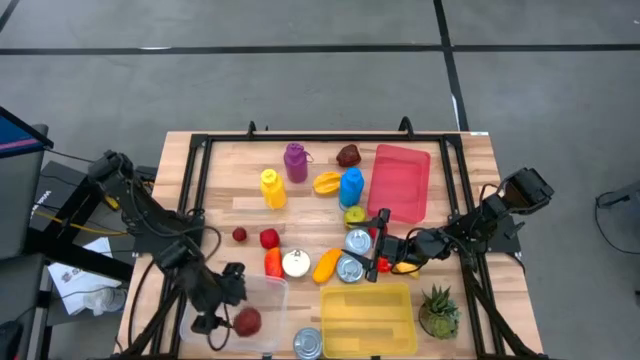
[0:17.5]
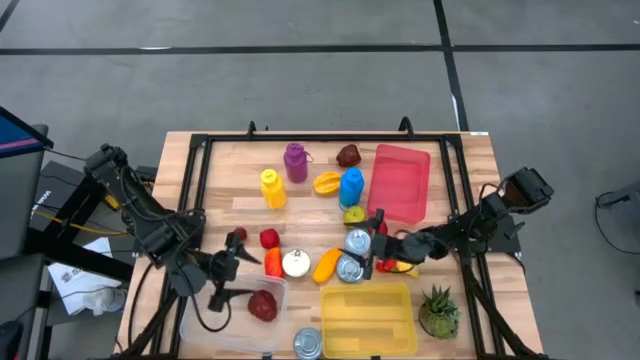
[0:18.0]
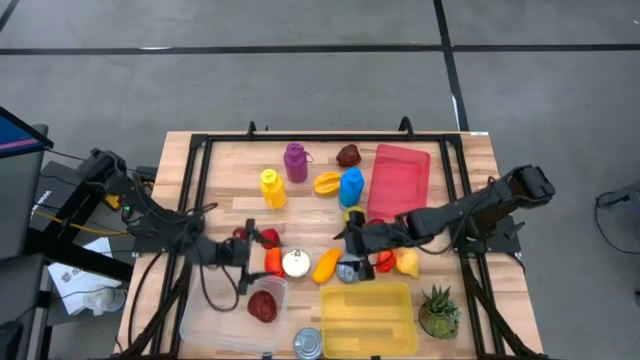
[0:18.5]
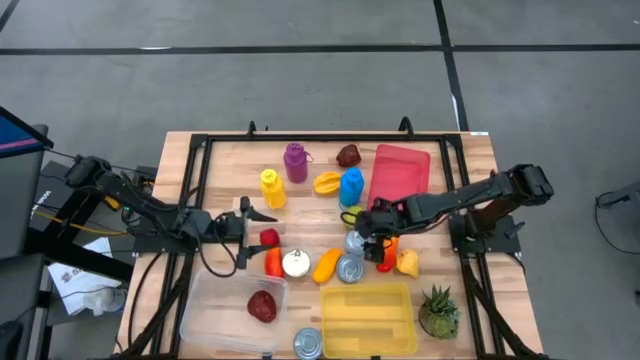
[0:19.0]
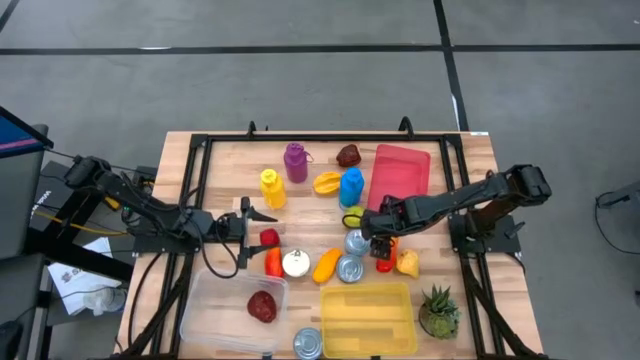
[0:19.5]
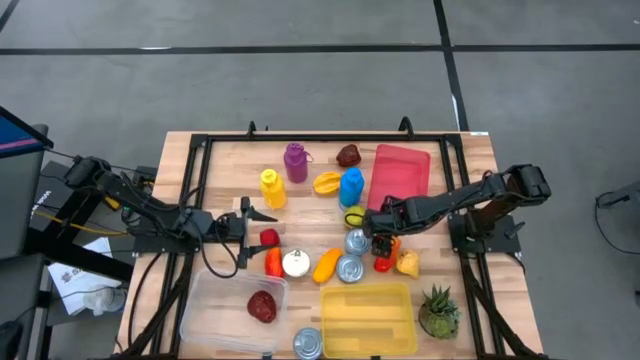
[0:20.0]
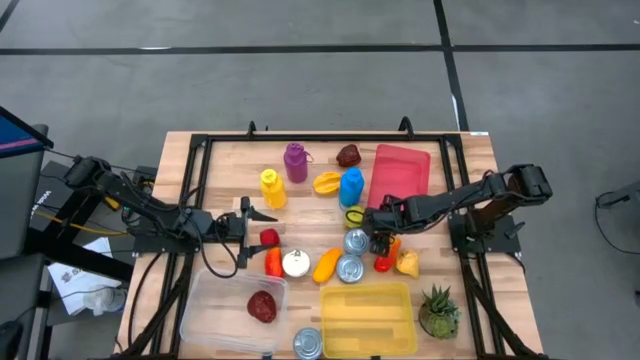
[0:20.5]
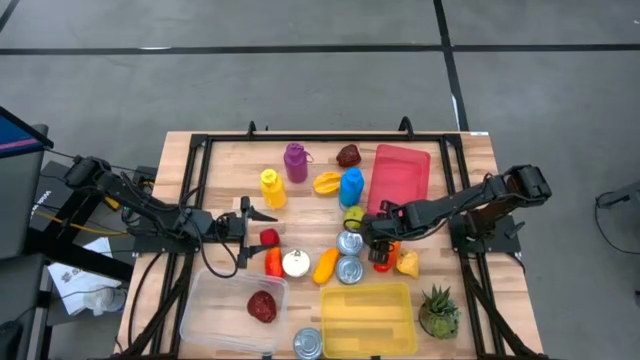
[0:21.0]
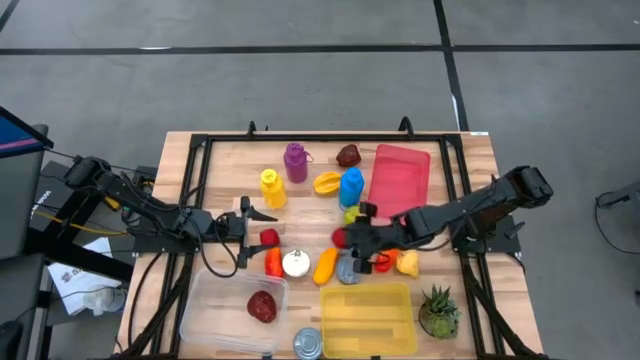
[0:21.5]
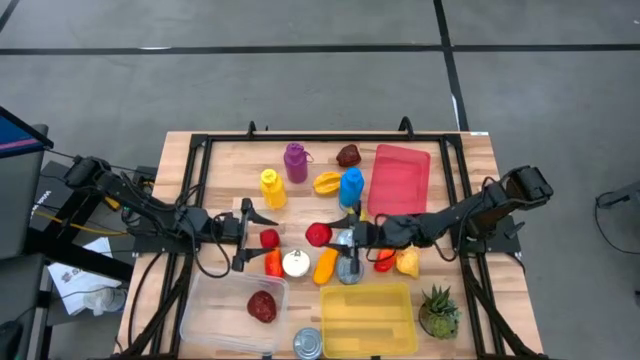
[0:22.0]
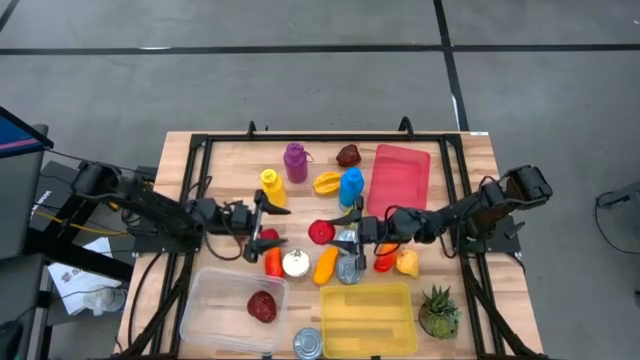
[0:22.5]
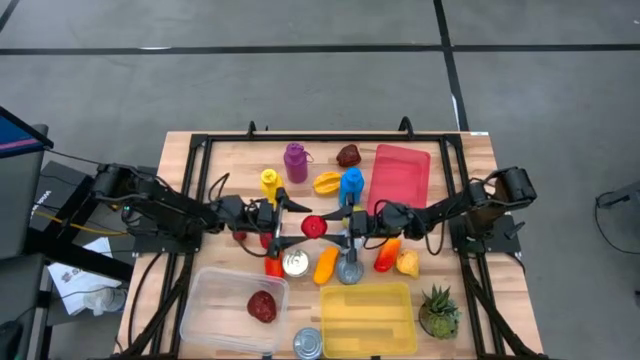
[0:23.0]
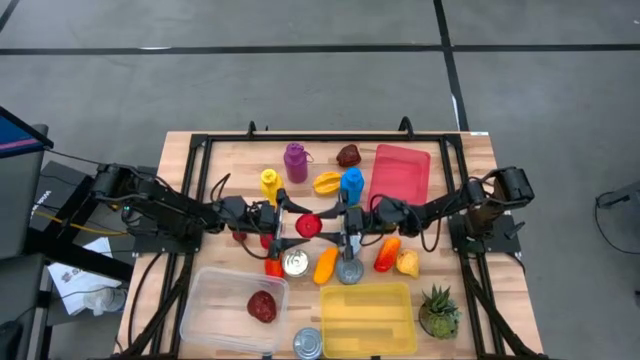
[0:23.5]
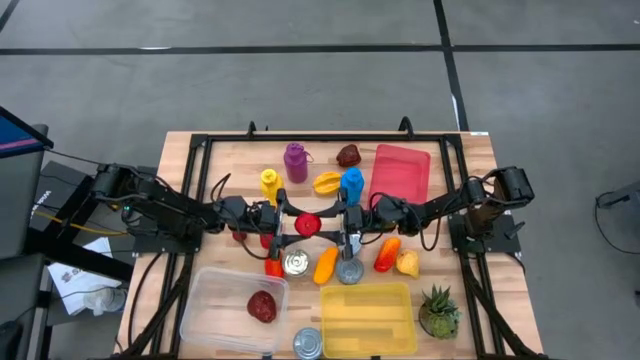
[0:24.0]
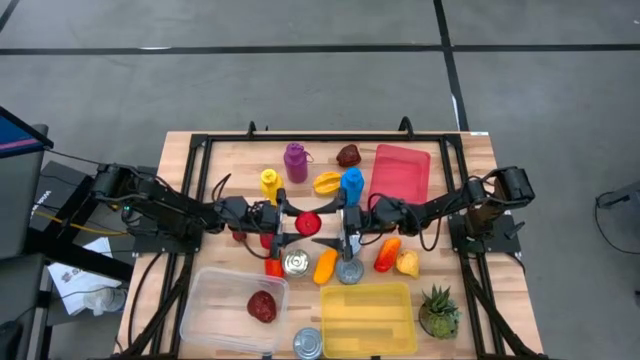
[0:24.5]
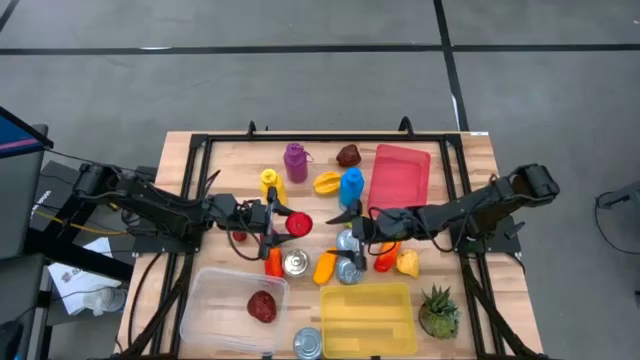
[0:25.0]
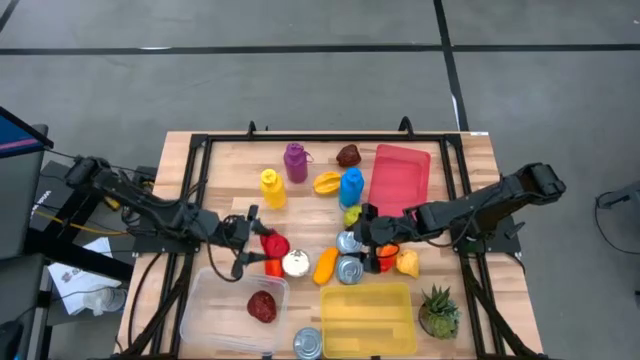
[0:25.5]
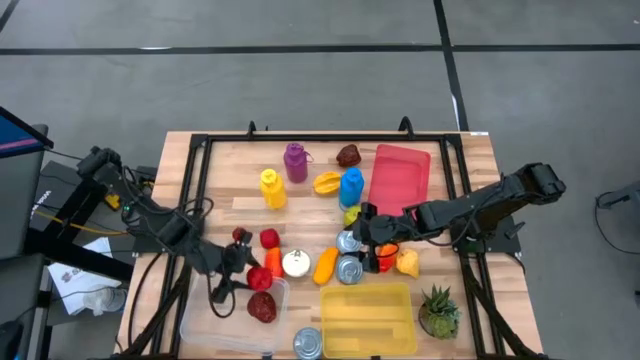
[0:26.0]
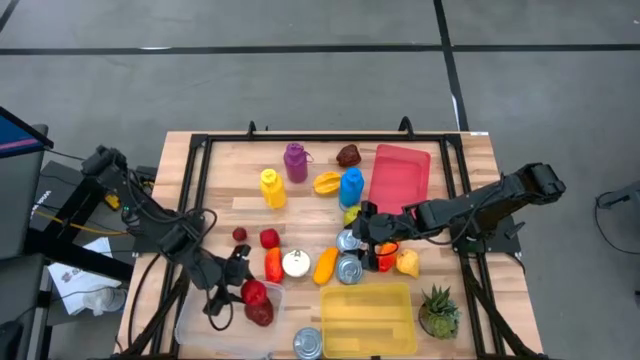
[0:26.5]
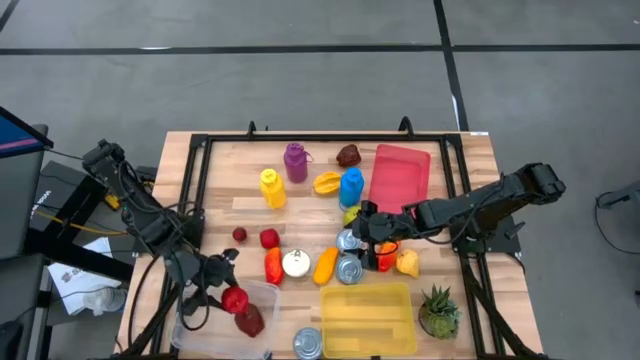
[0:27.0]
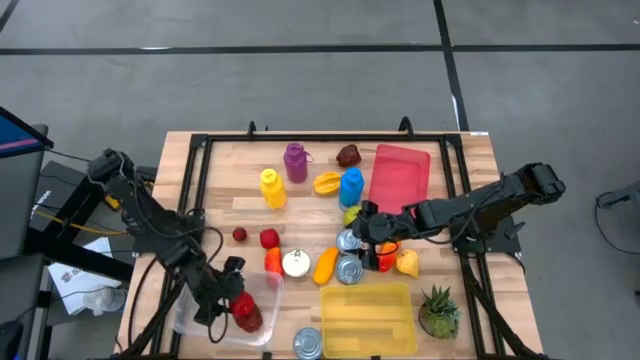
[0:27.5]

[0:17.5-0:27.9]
Task: Pick & Place Food Item
Put the right red tomato into the transparent bin

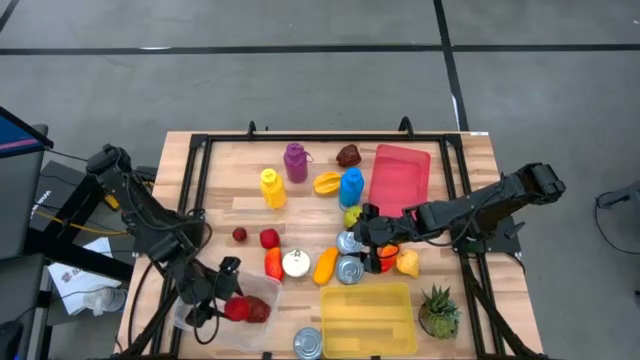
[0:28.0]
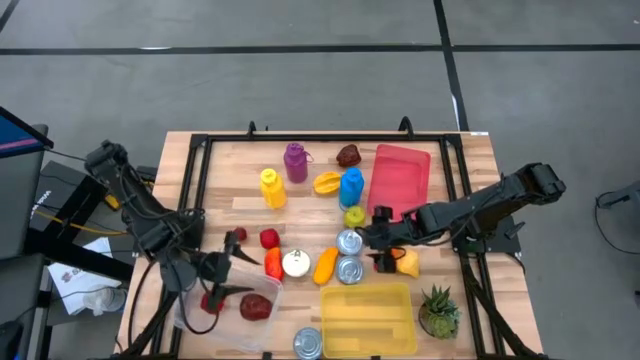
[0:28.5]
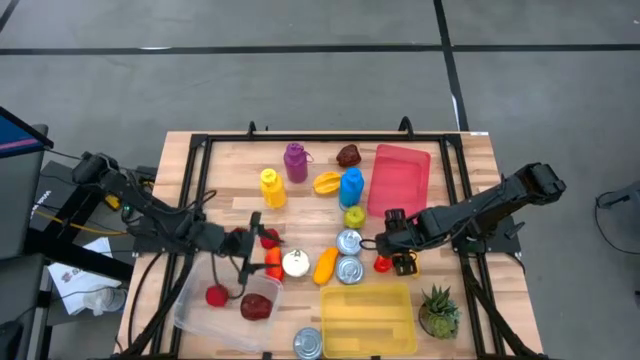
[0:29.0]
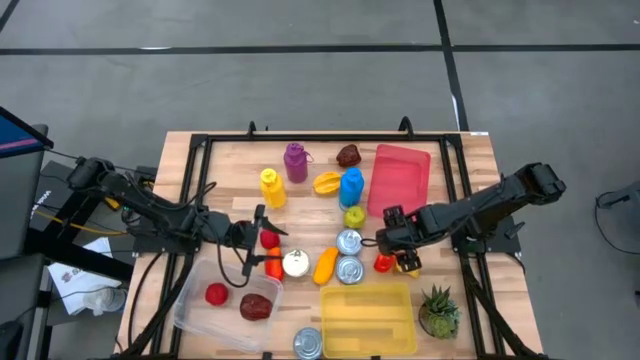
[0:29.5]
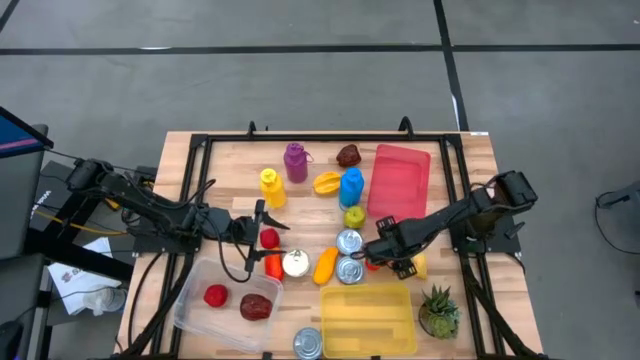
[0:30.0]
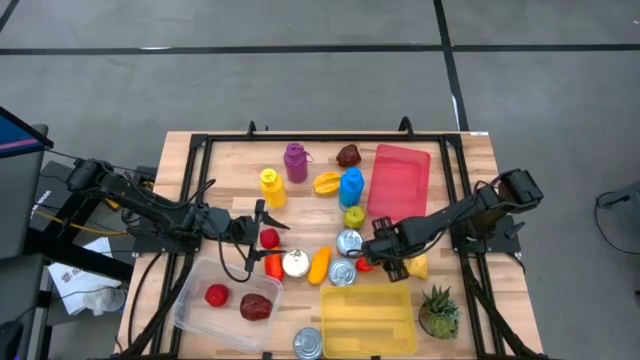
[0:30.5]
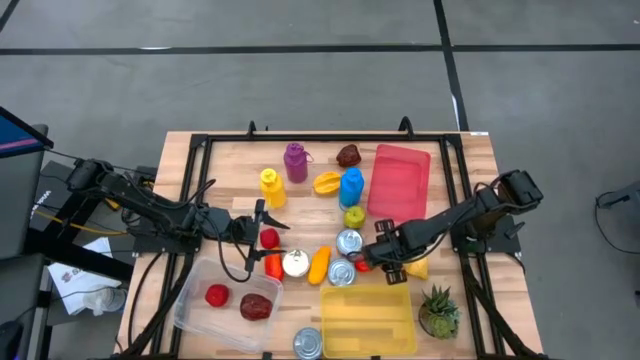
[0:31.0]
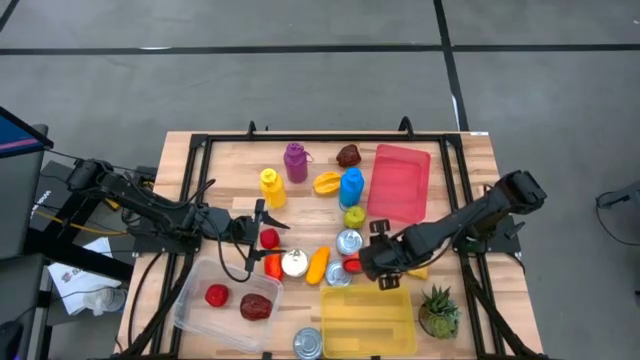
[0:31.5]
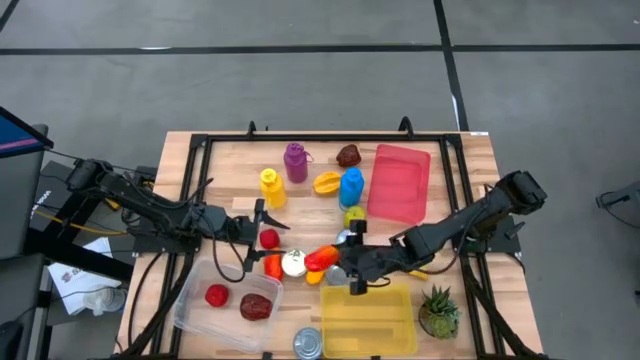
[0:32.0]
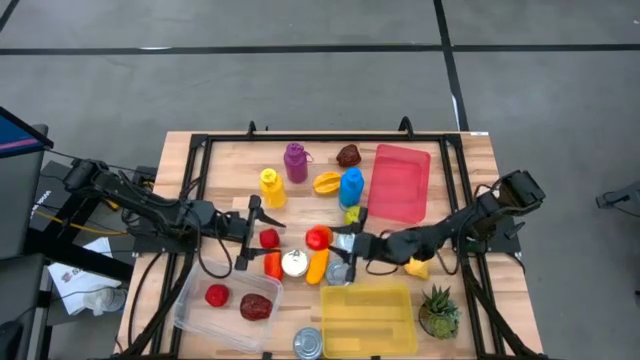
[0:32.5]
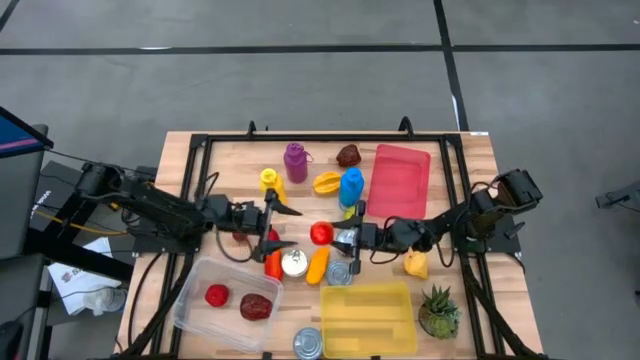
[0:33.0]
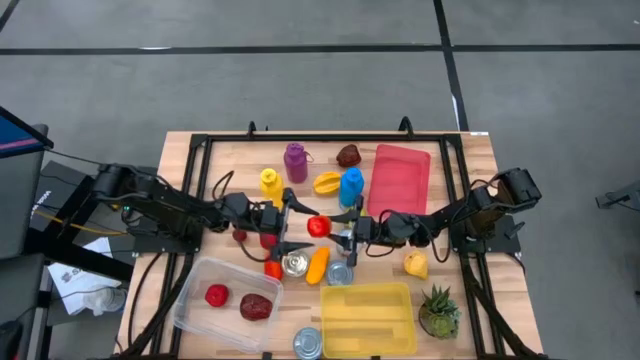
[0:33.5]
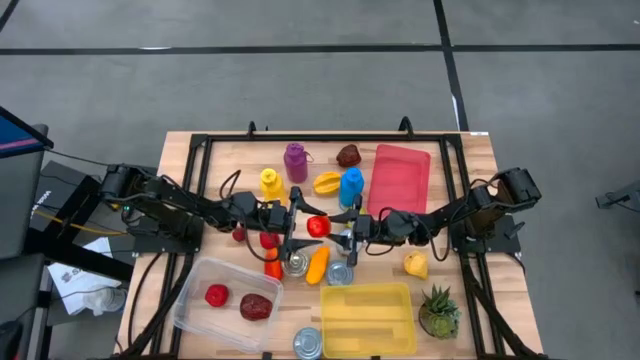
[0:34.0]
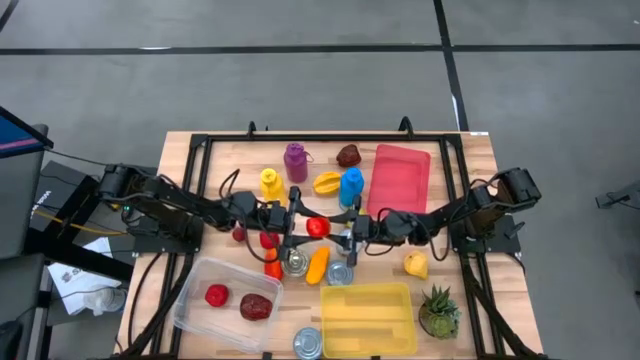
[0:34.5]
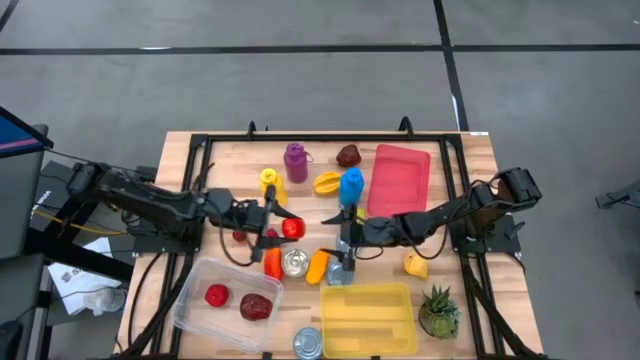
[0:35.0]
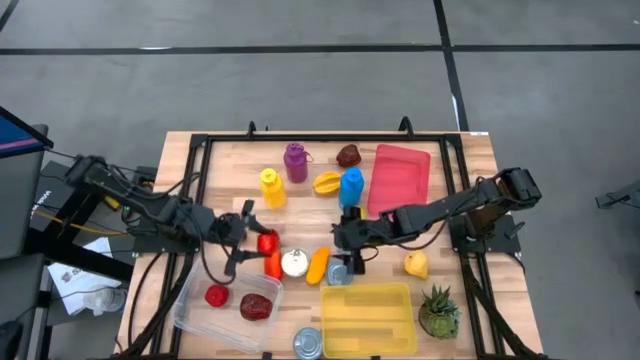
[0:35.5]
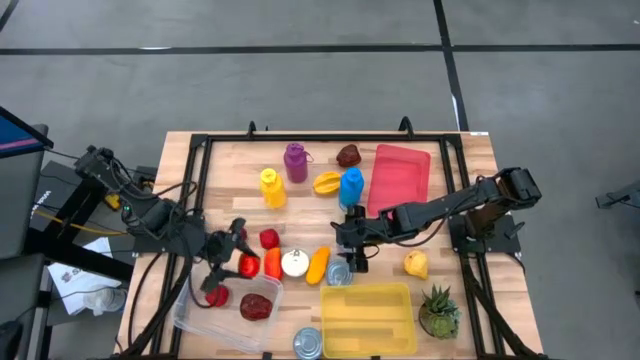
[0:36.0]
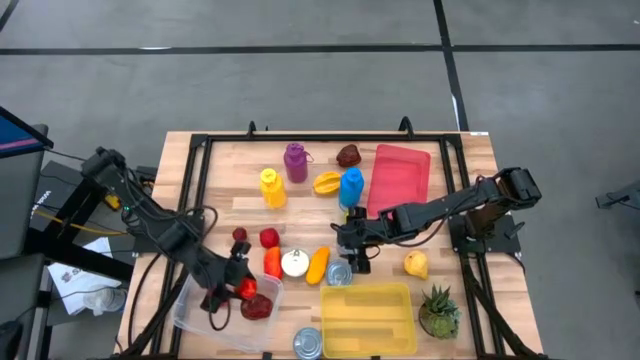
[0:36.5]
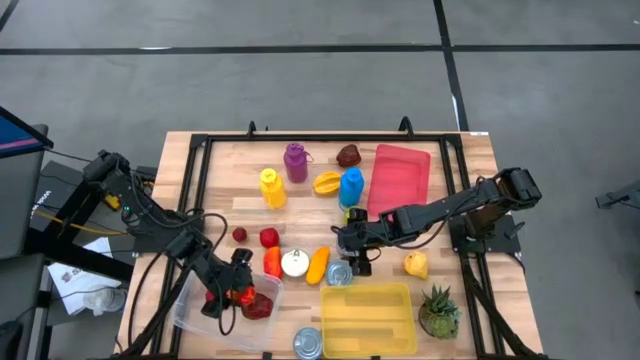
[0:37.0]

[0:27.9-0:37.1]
Put the right orange mango into the transparent bin

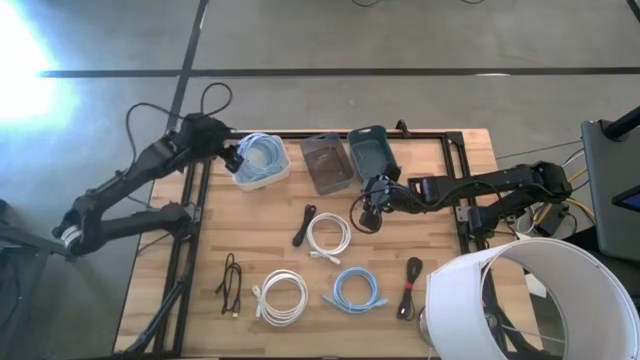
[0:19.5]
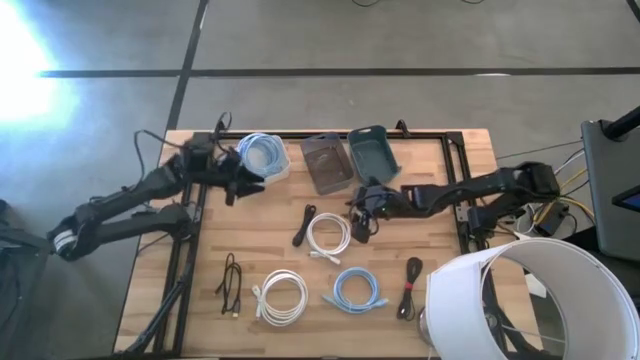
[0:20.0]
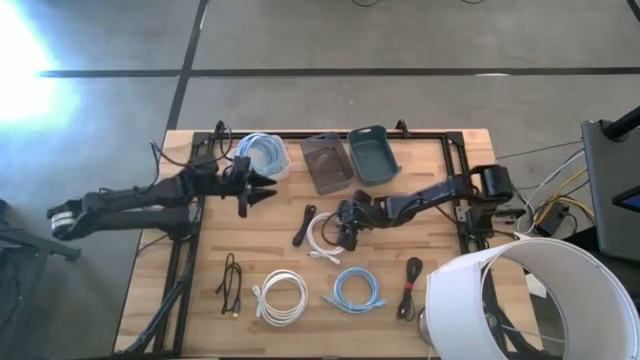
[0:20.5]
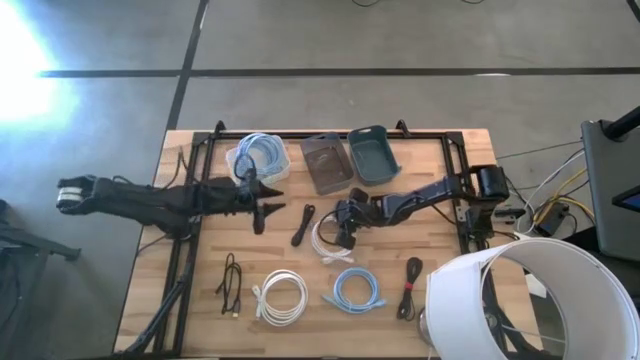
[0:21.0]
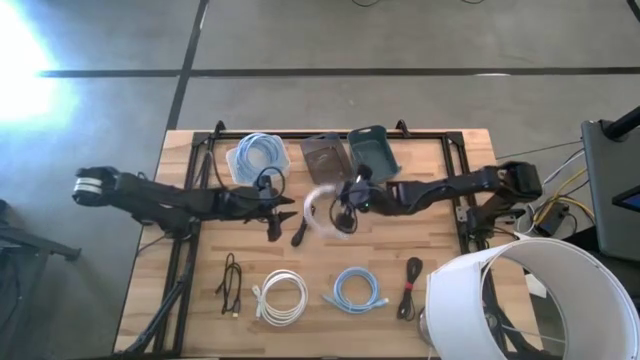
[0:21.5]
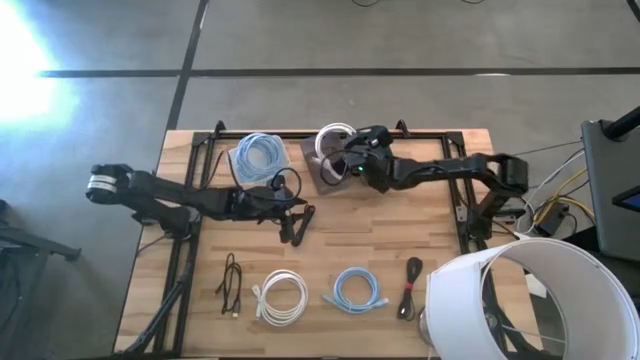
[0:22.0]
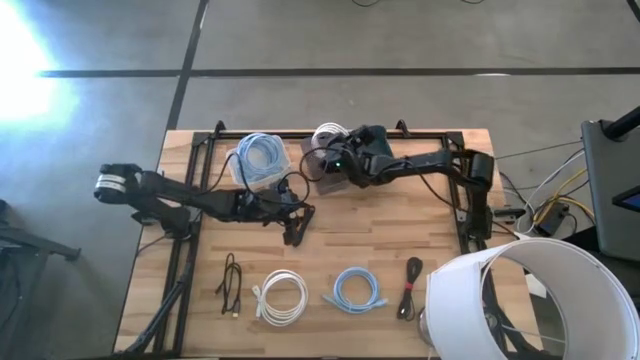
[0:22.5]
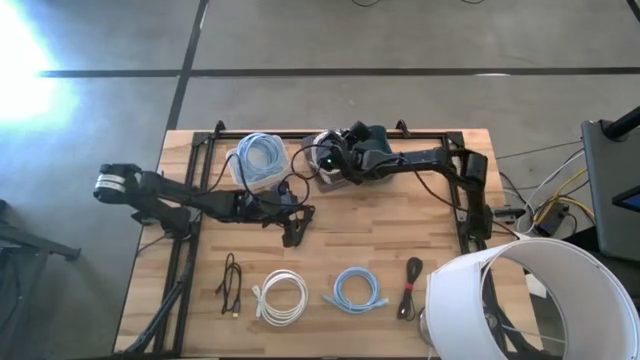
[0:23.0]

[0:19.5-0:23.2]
Task: Pick & Place USB Port
Put the top white USB cable into the black transparent bin
